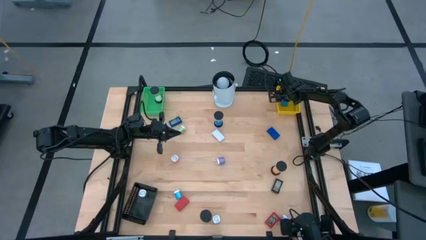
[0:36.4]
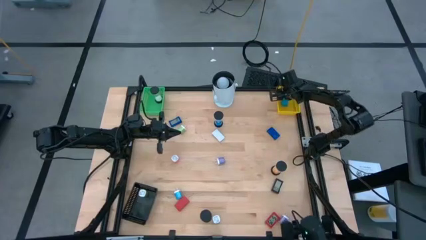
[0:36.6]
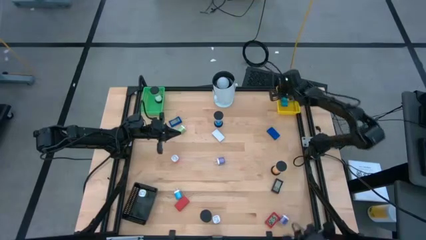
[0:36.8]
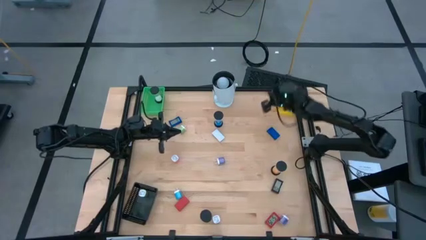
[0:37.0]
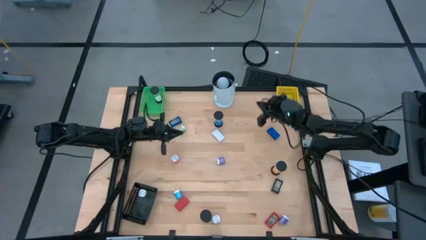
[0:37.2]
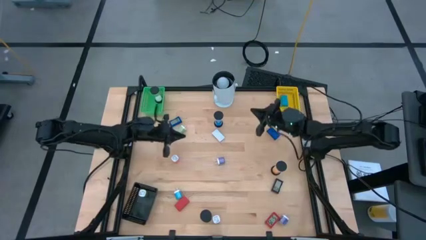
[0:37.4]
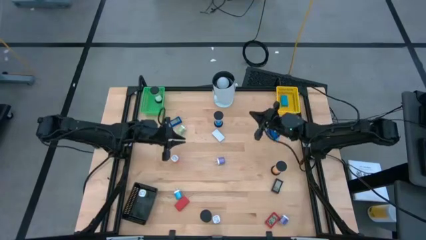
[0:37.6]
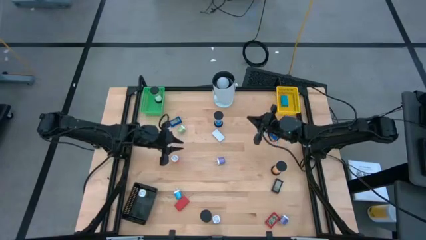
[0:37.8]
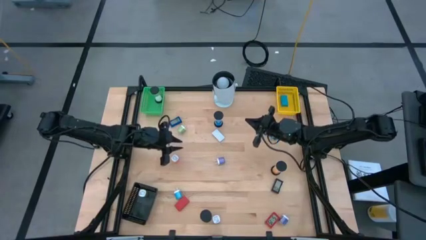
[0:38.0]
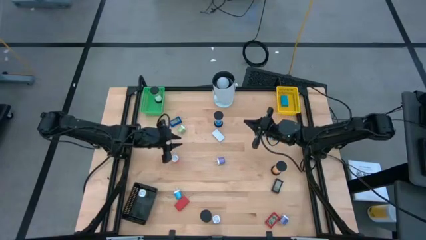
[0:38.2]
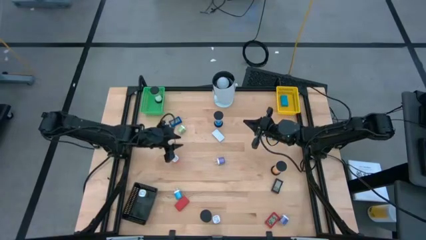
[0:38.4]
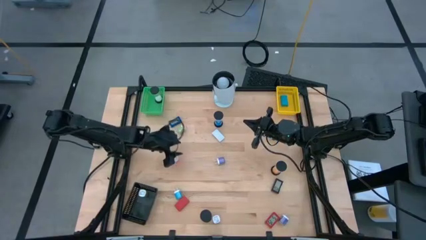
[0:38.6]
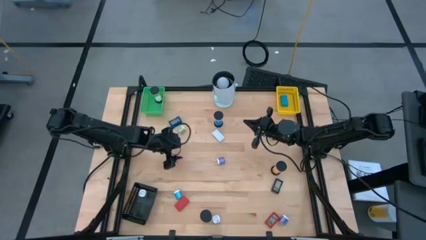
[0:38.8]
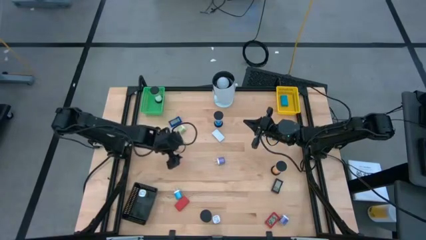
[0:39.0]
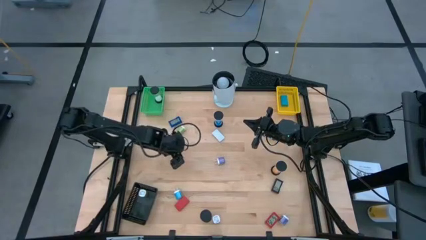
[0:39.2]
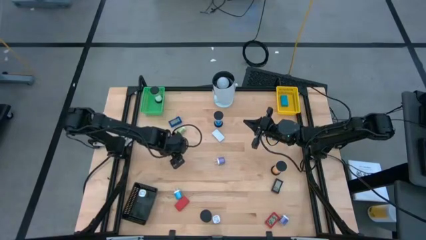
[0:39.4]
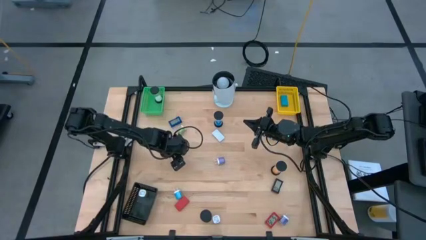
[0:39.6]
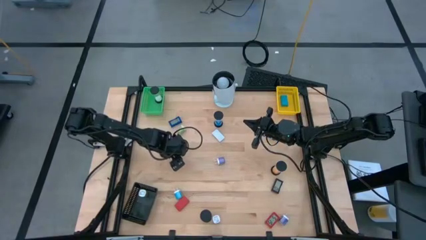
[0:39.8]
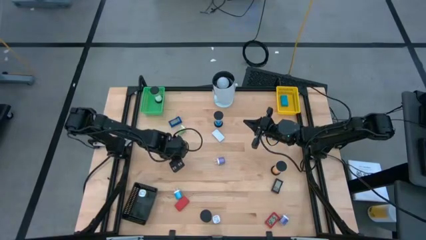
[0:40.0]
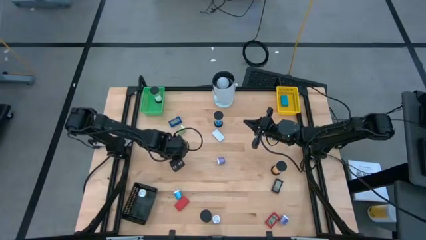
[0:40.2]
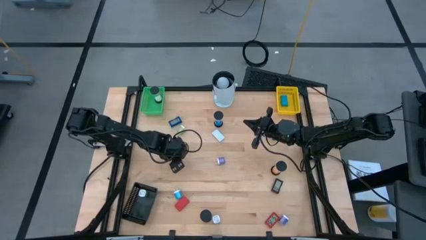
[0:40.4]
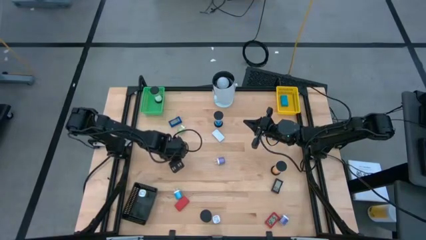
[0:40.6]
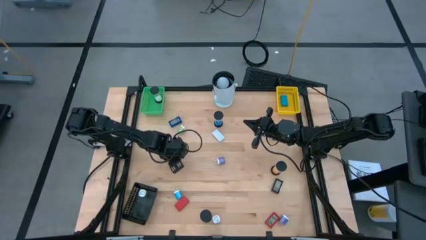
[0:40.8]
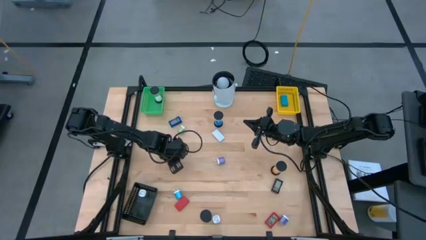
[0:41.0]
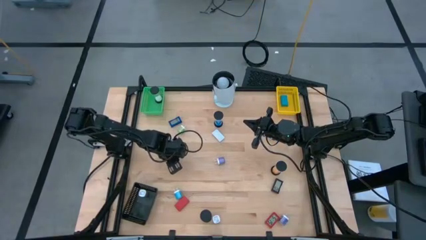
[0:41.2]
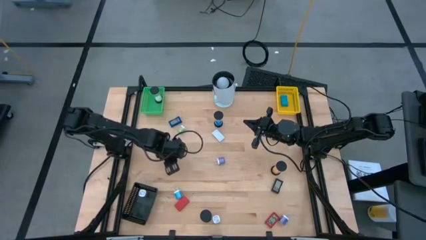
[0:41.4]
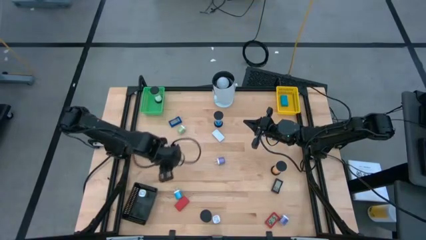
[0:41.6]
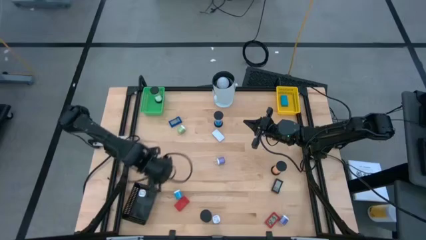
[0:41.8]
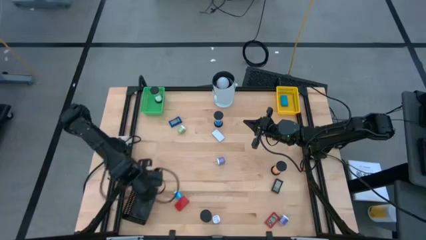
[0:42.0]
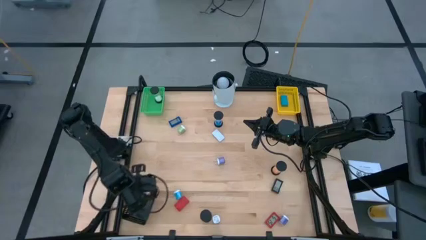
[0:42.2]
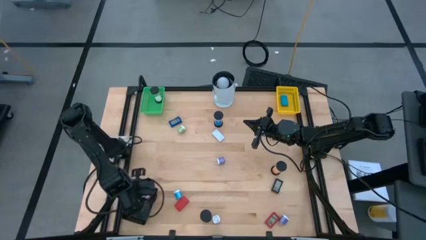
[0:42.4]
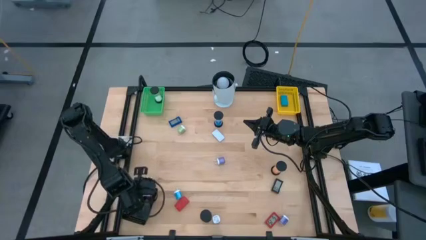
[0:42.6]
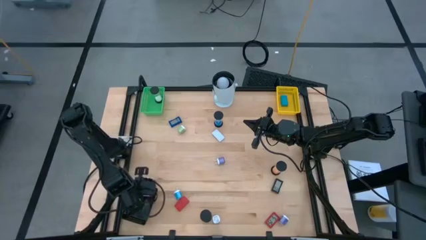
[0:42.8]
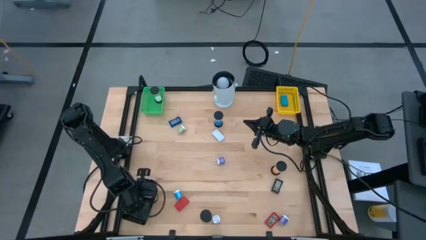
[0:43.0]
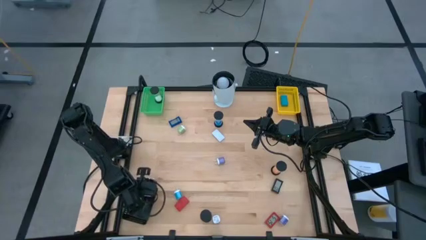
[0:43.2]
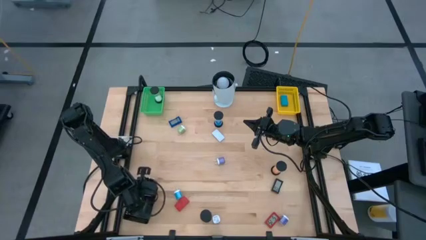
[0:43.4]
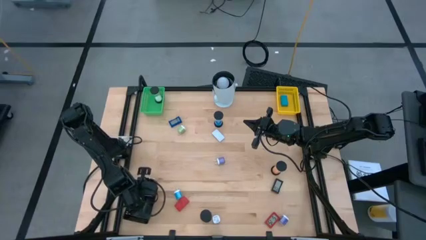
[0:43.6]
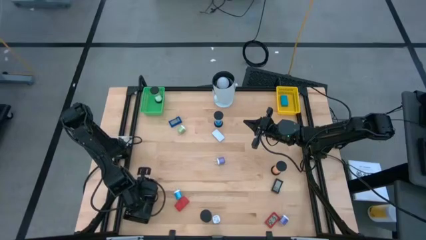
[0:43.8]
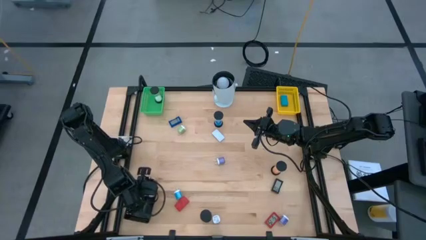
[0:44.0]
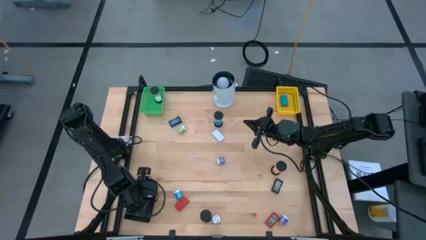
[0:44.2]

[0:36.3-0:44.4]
Task: Pick & Place Office items
Put the pink charger adapter into the black bin

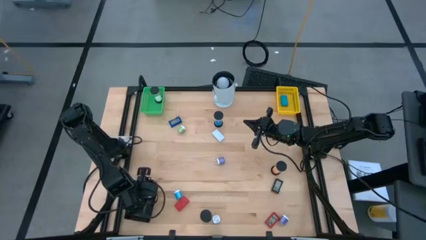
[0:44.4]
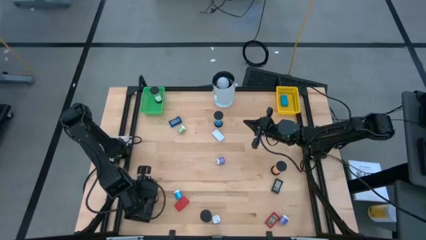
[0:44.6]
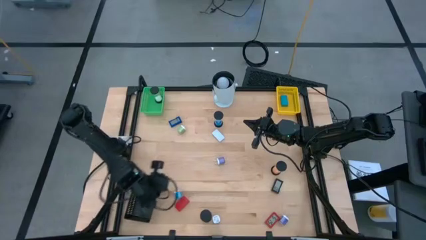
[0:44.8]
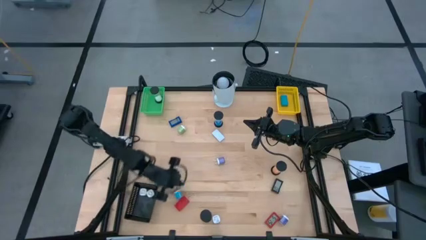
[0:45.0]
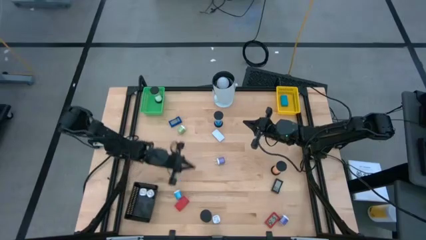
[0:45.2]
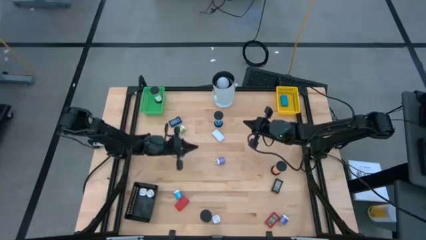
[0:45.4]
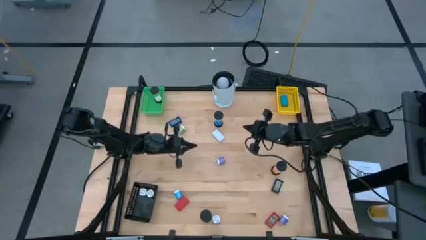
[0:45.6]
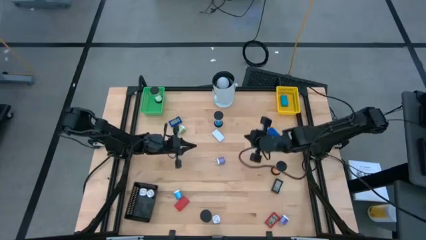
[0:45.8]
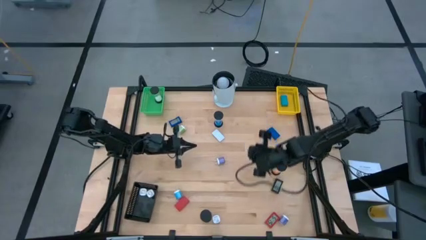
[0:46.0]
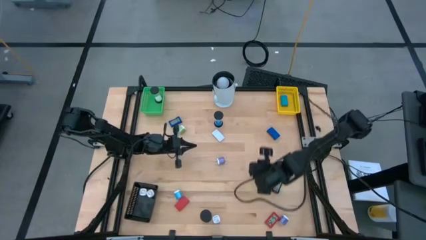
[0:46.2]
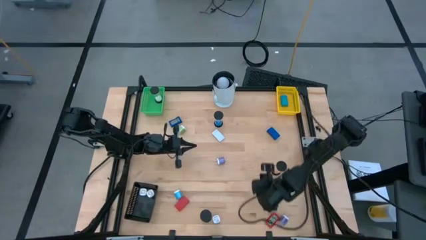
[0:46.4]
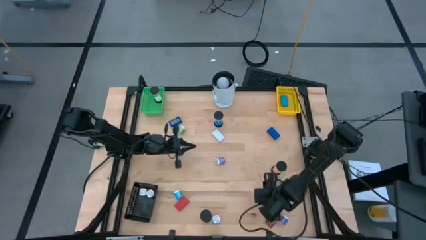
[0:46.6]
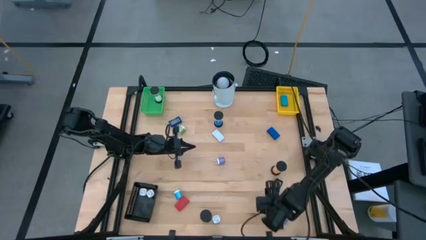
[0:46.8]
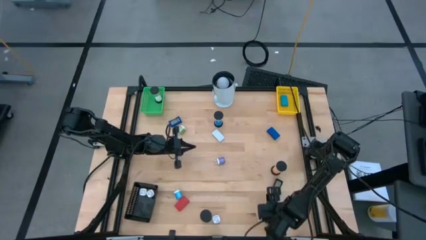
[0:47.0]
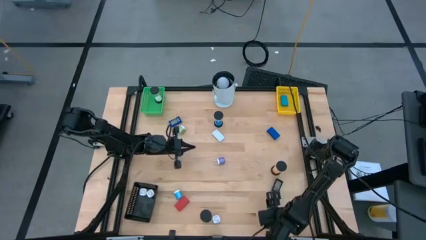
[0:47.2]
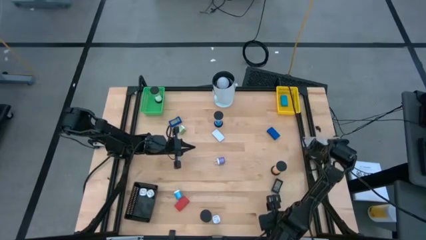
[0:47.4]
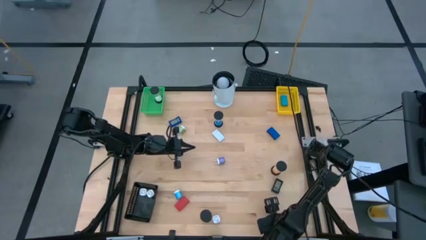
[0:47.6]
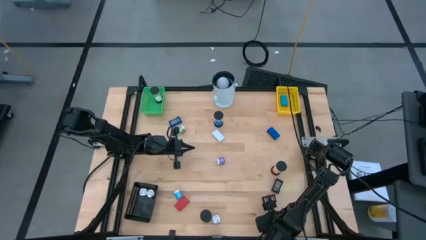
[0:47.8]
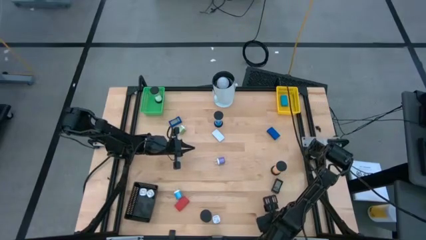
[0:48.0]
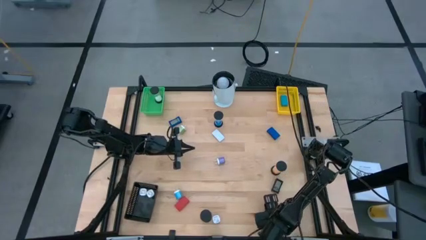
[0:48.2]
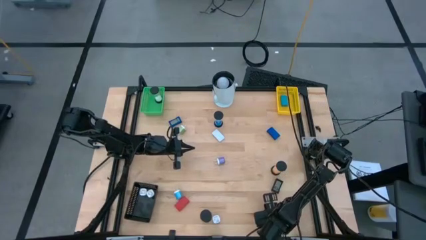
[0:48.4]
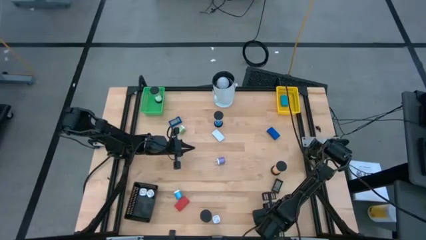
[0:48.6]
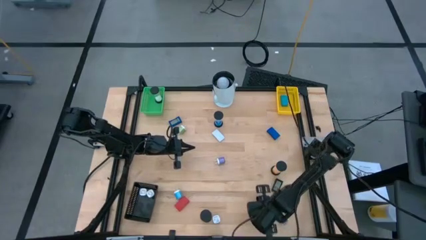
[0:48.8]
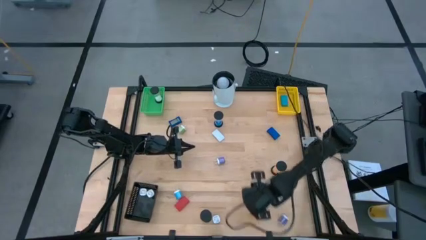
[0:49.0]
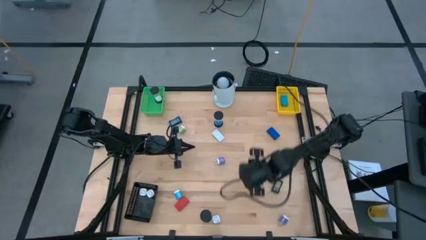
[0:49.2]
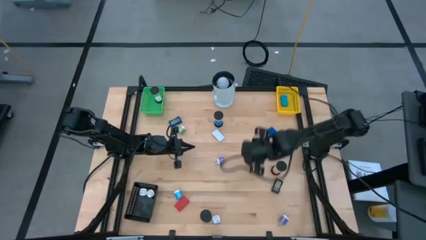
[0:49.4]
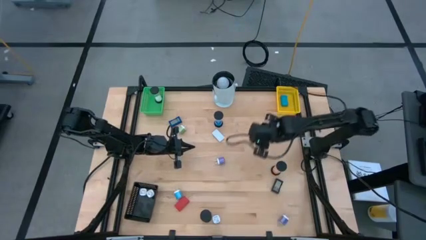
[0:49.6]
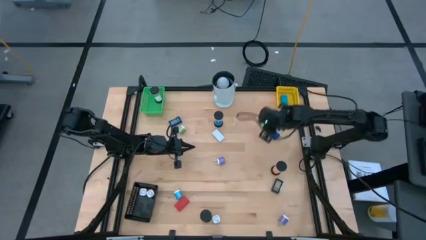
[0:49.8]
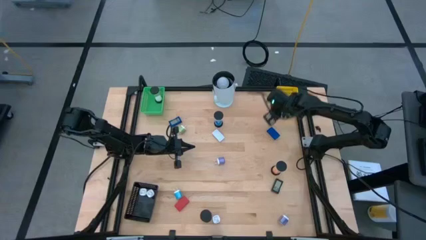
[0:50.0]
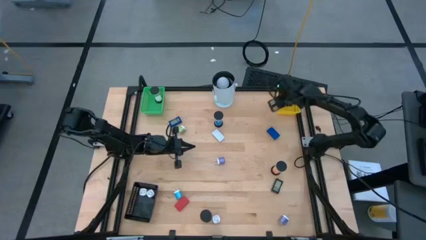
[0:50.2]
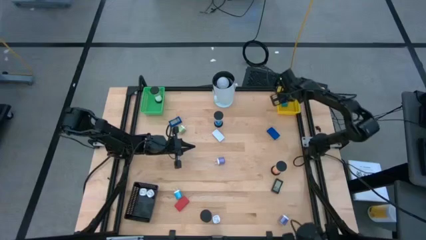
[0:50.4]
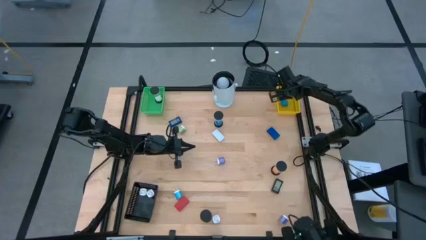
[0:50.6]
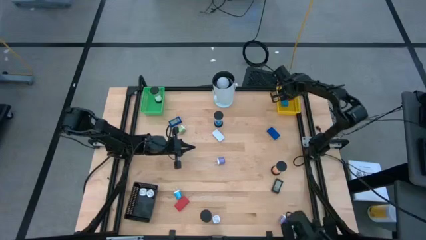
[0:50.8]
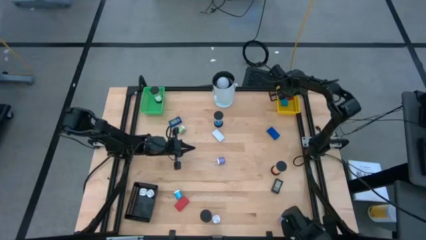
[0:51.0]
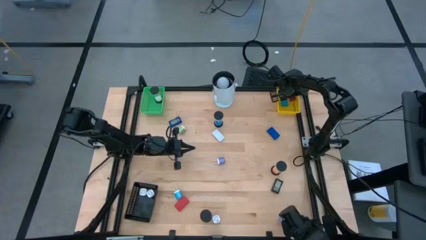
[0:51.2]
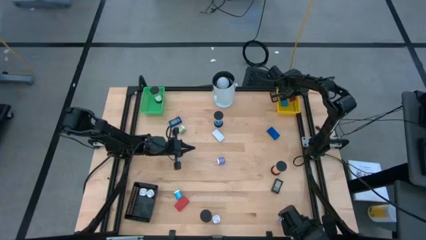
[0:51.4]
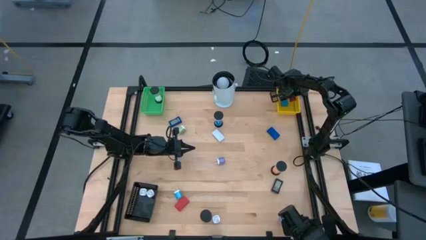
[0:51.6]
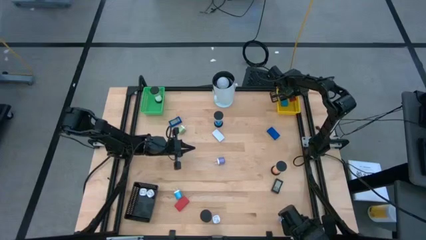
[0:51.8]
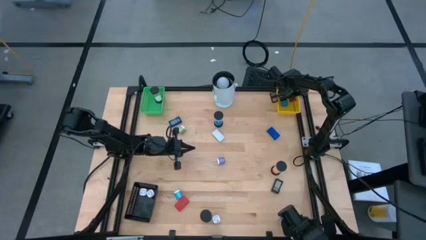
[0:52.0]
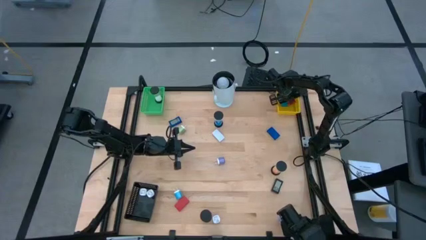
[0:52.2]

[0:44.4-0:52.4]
Put the right red digital clock into the yellow bin
